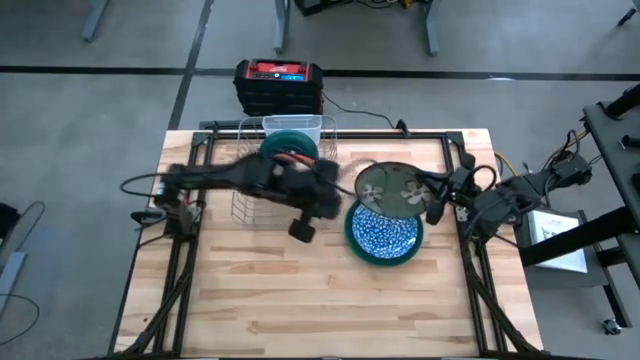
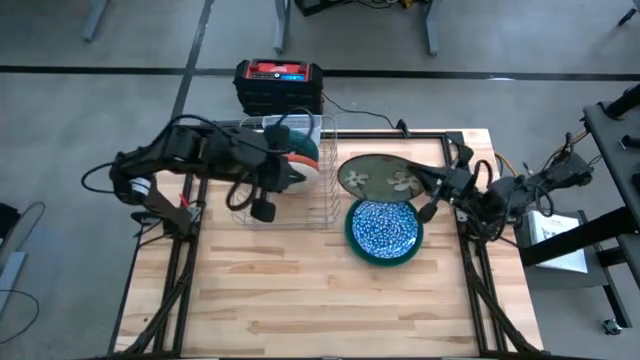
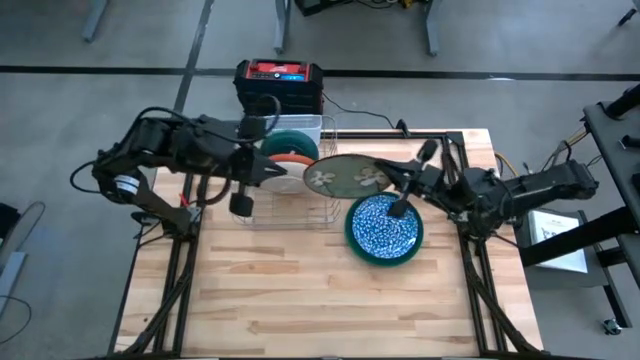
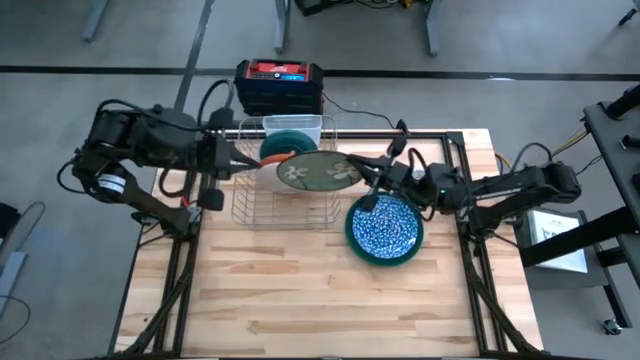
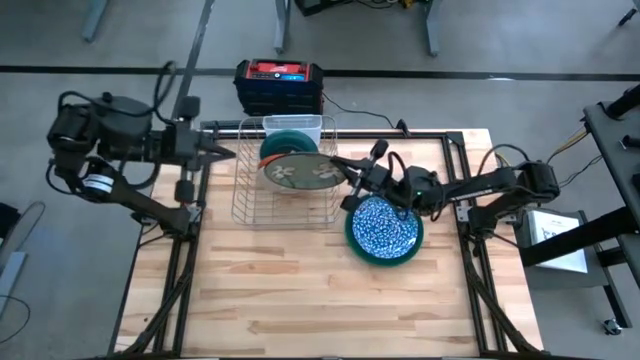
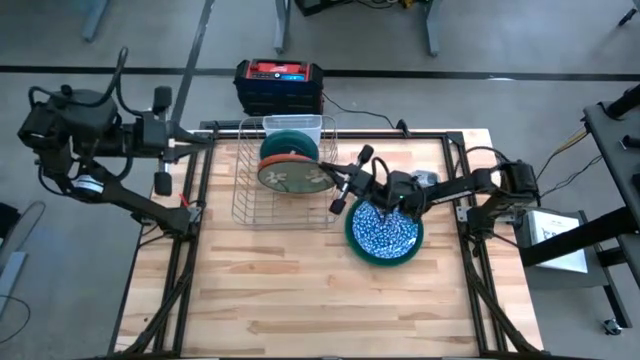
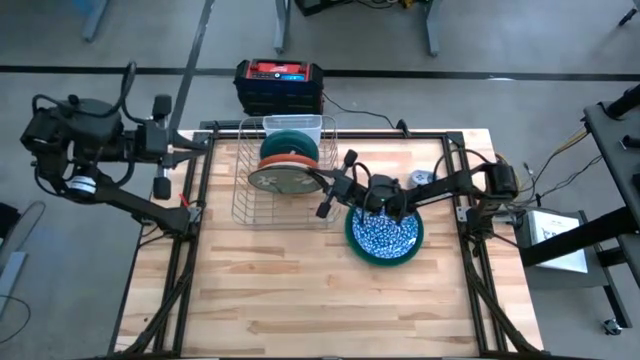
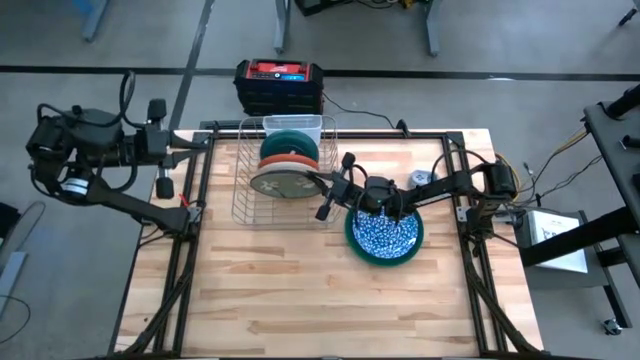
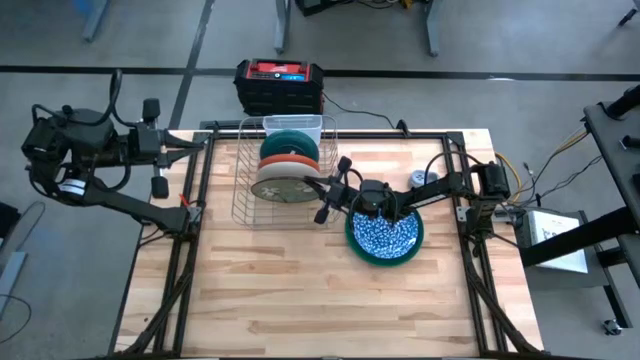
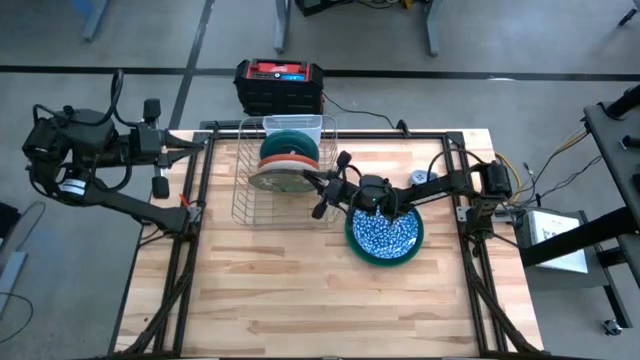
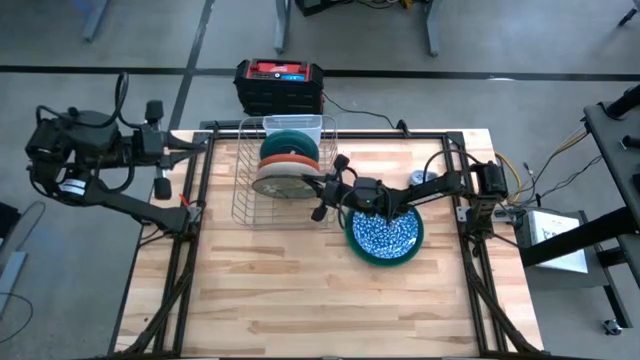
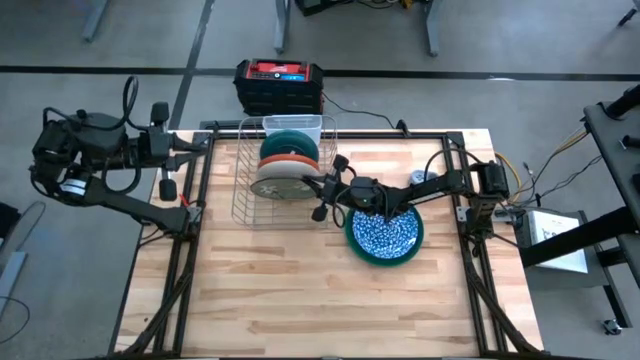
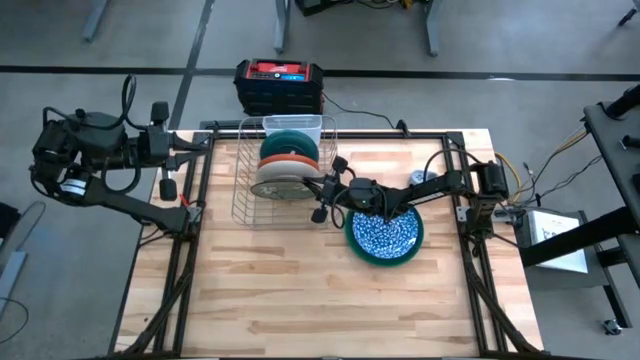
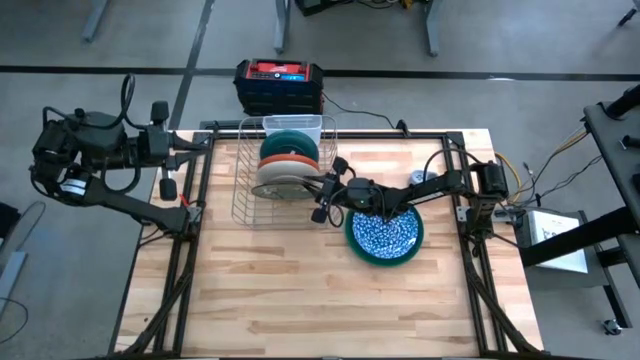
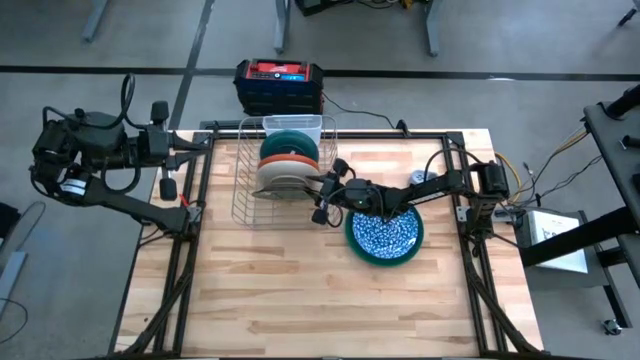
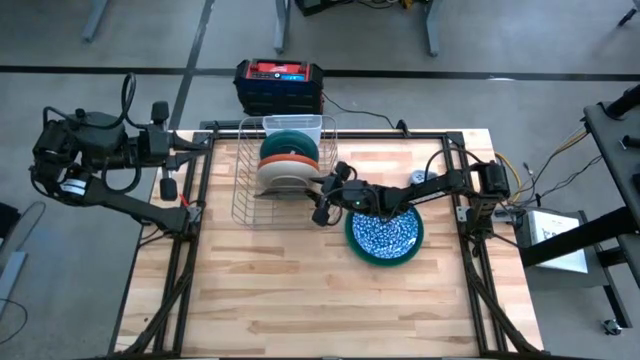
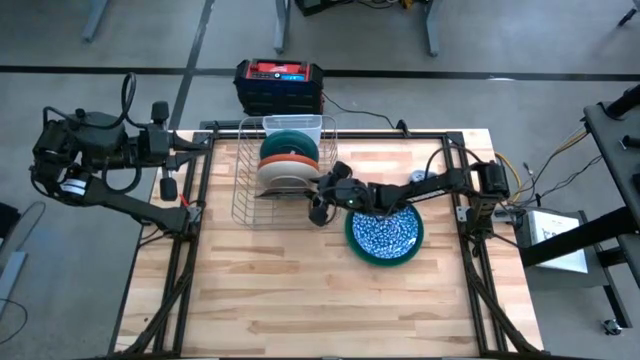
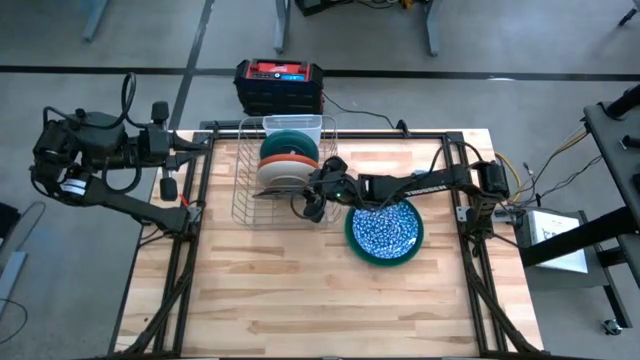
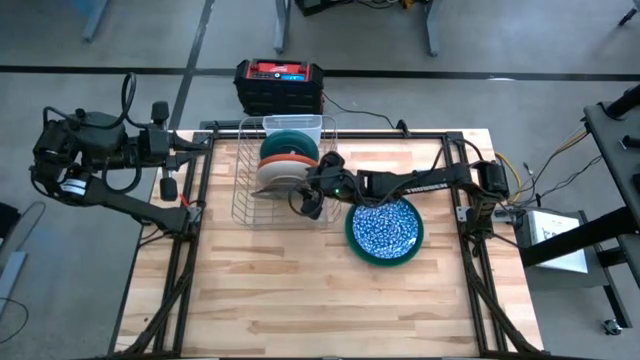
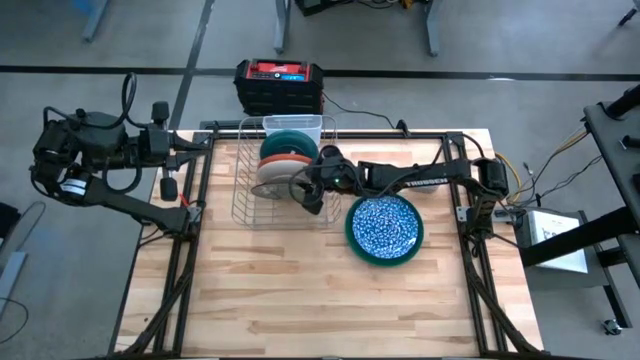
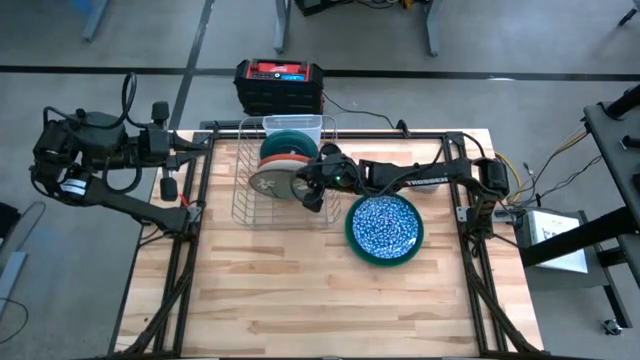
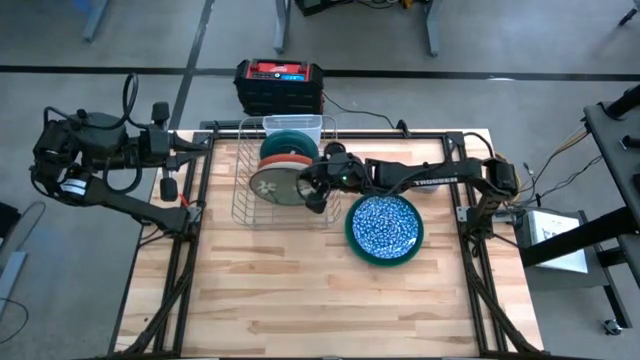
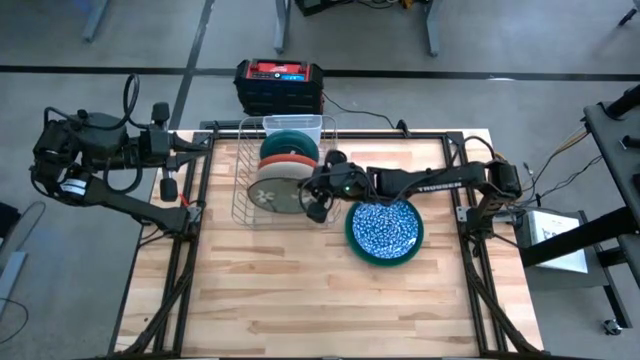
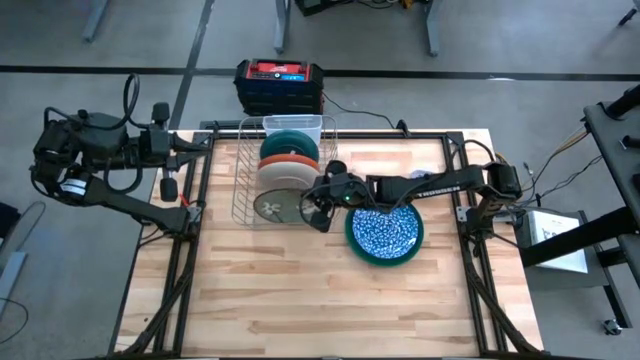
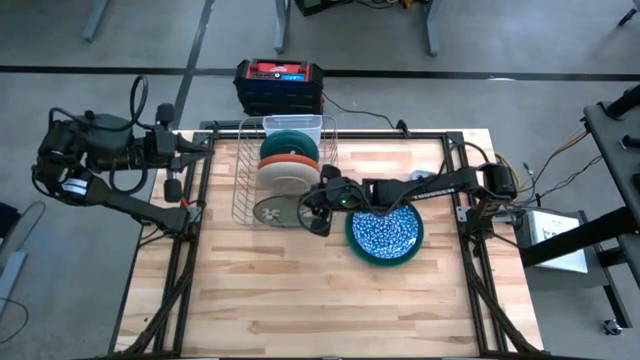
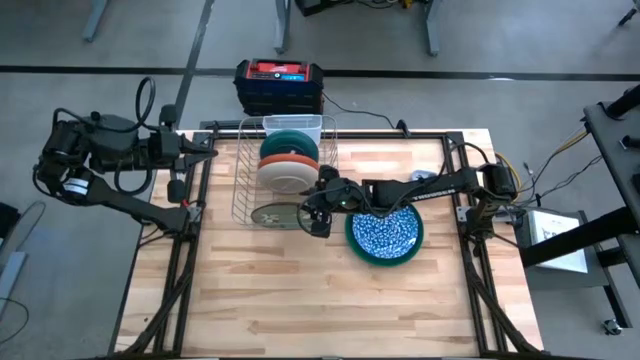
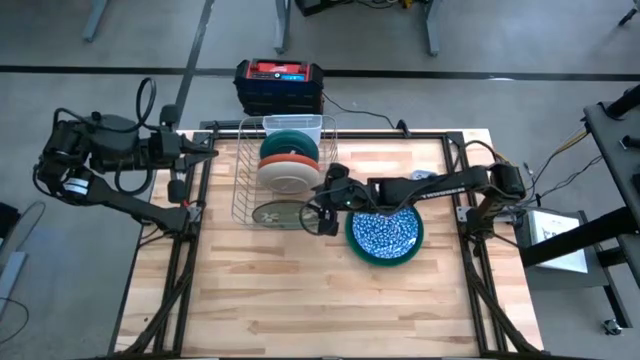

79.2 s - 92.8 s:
Task: Sort dishes
Put the green ceramic plate into the dish rack

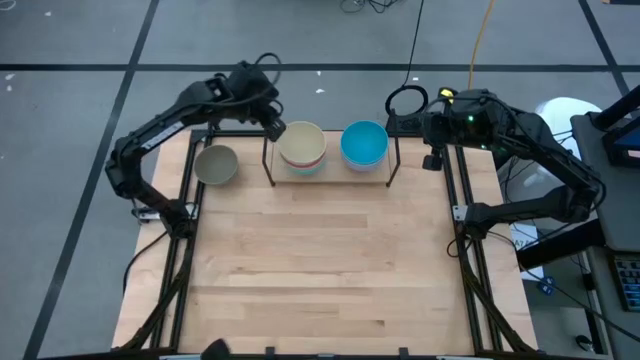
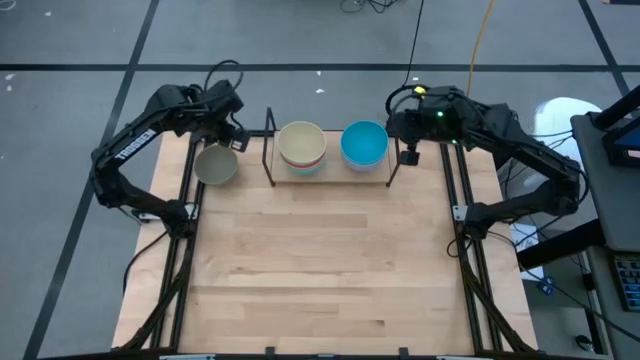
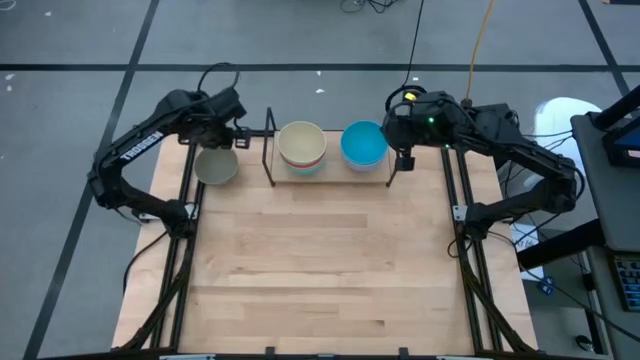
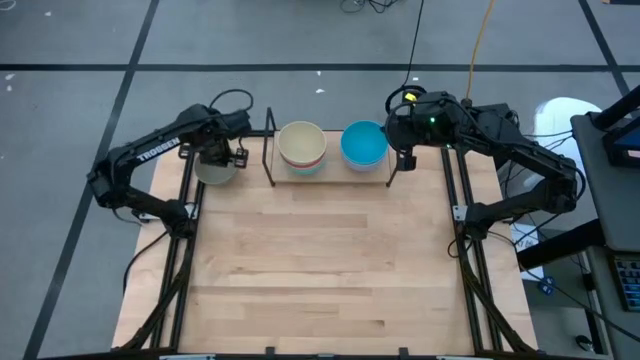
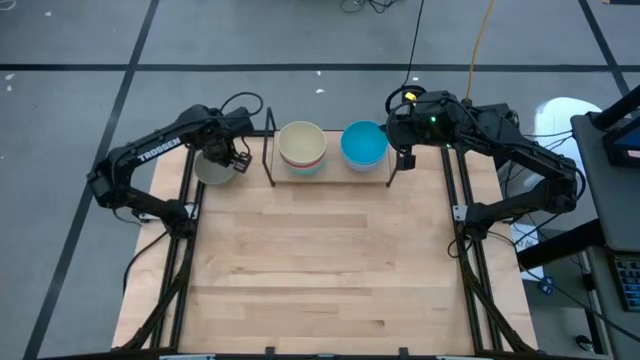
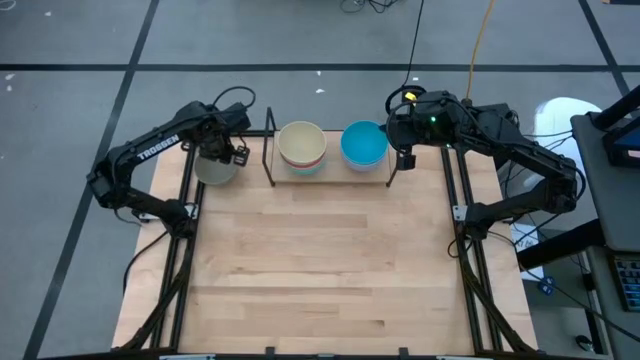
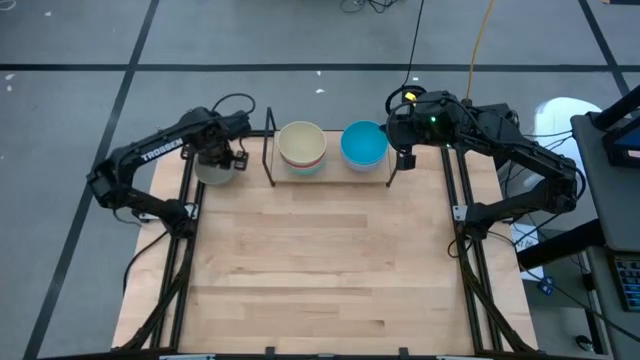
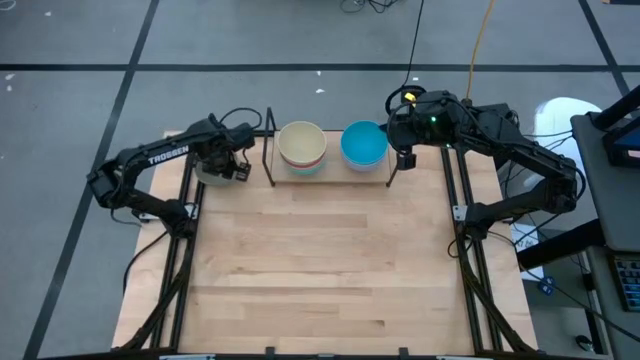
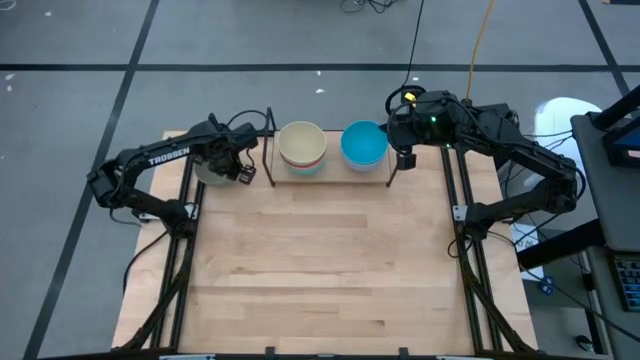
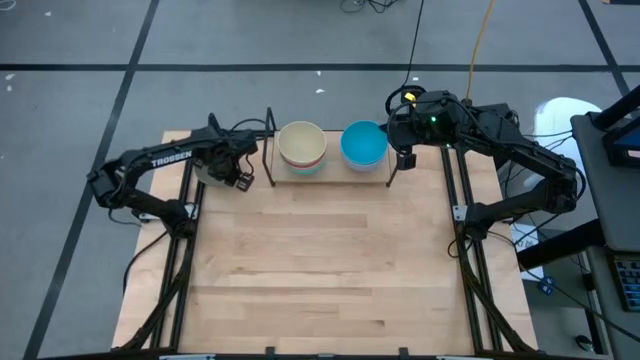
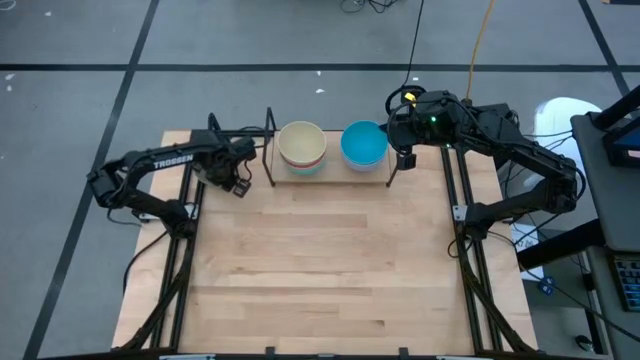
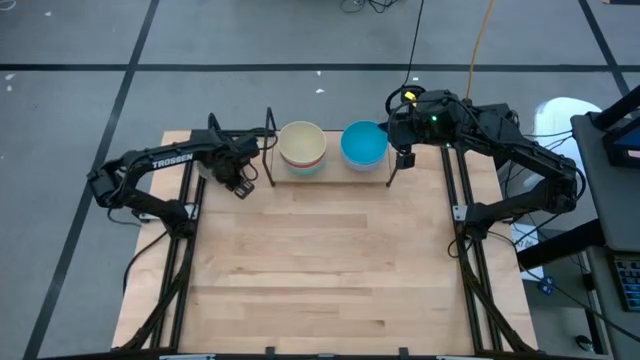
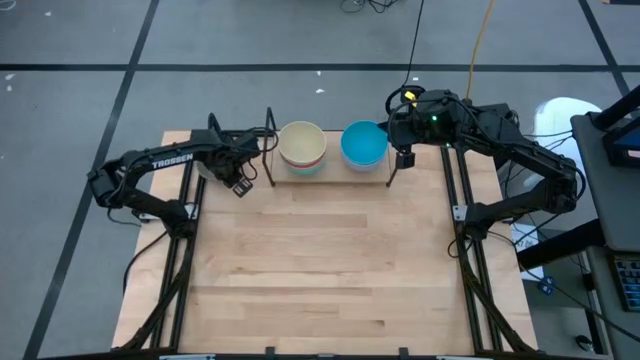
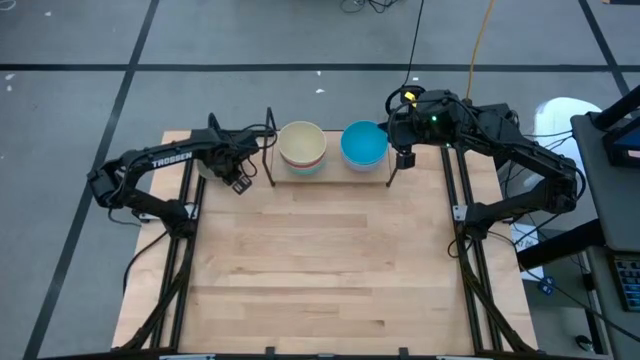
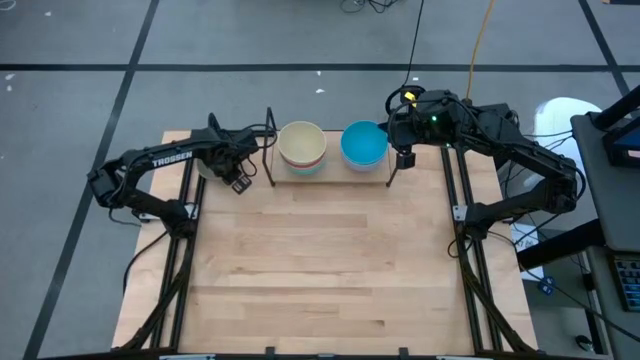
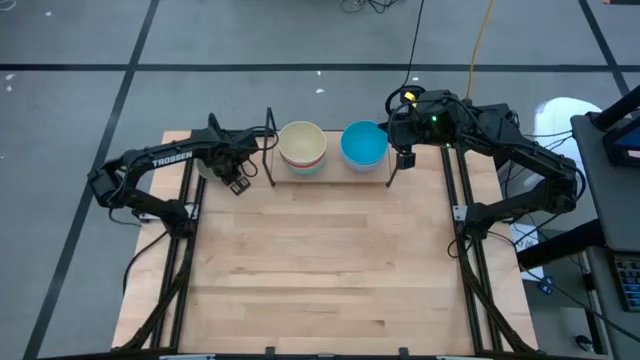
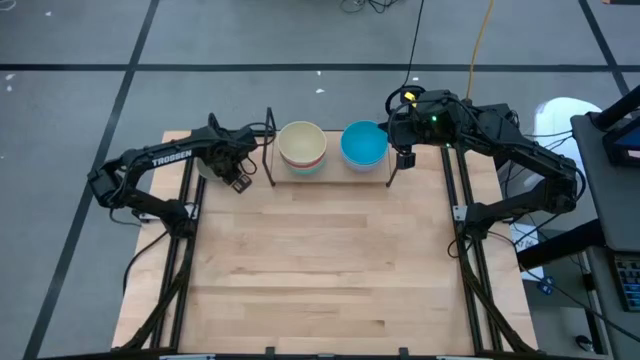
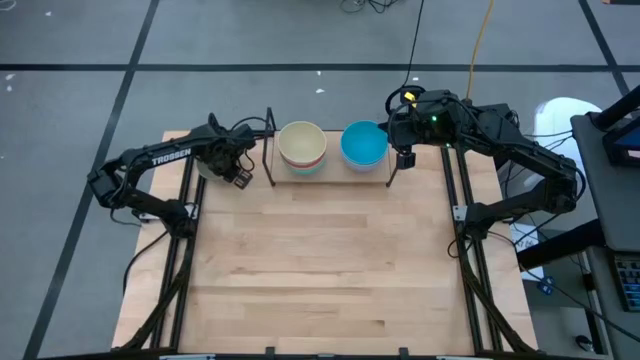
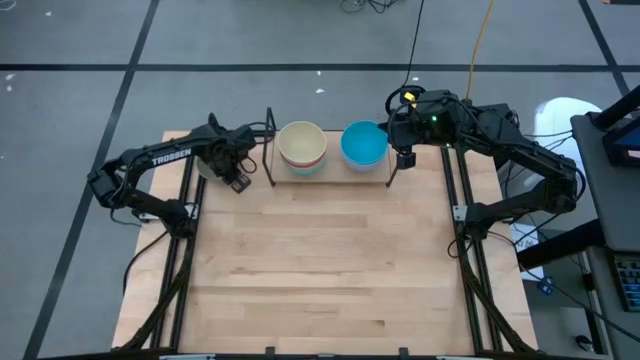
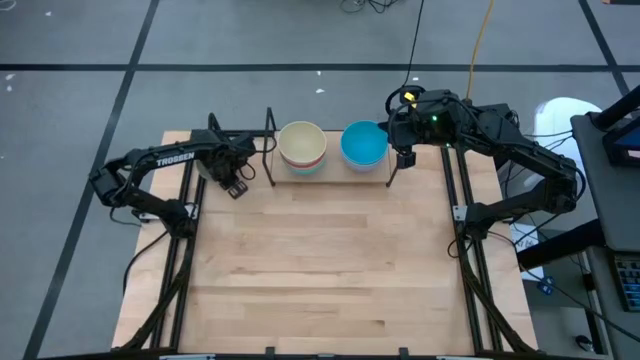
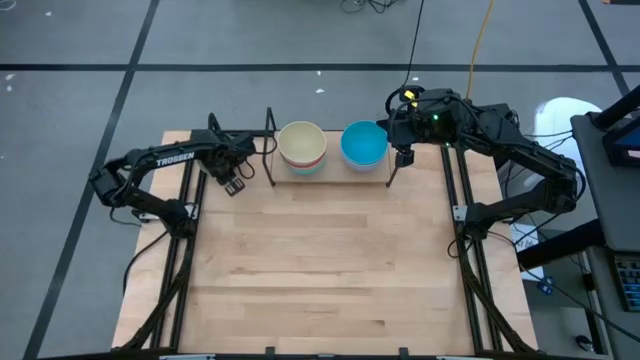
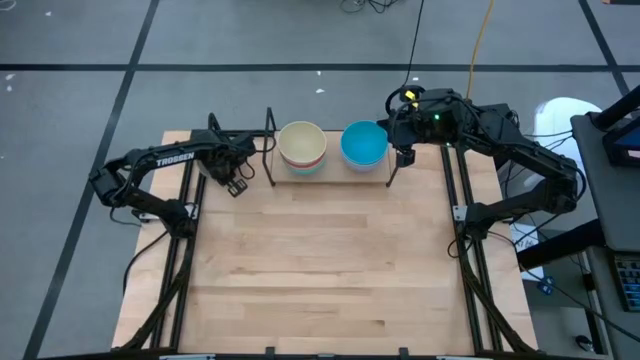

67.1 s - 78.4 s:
Task: Place and stack bowls onto a shelf
Stack the gray bowl on top of the blue bowl on the shelf
